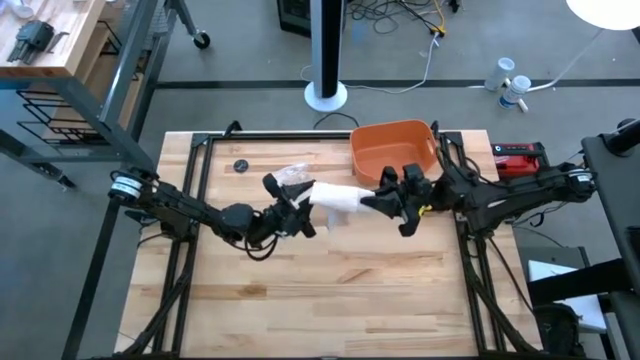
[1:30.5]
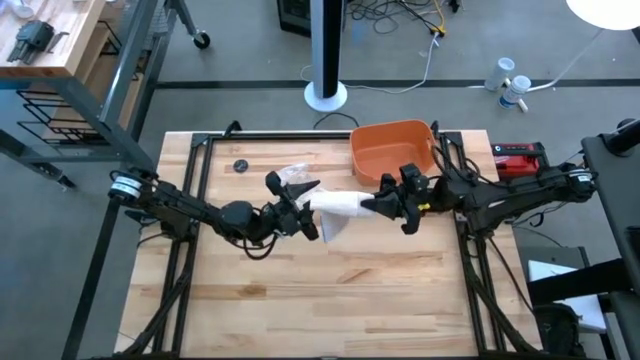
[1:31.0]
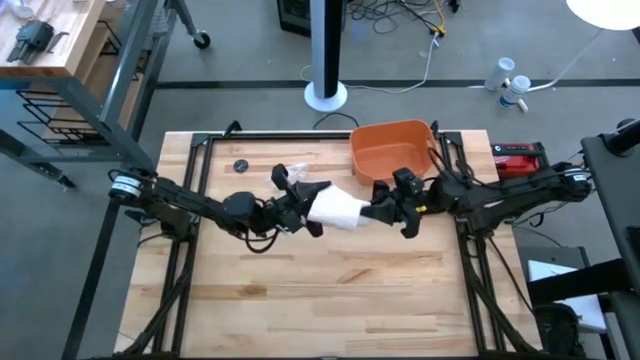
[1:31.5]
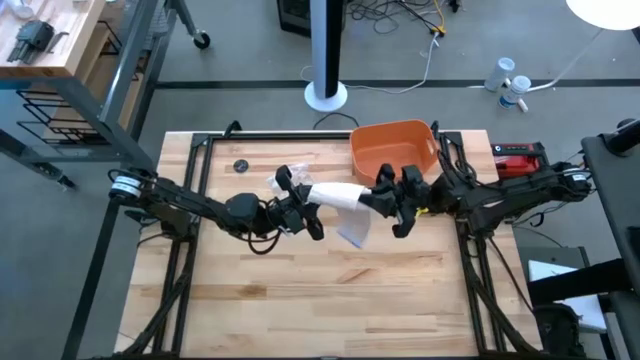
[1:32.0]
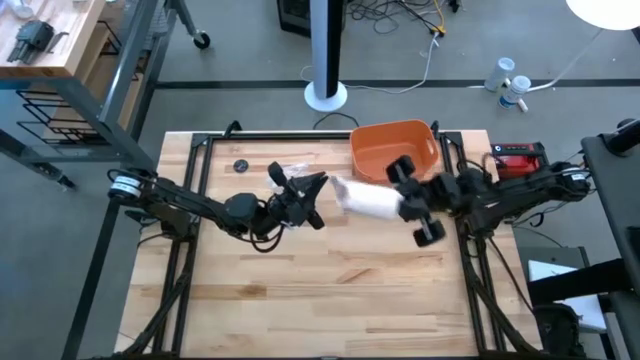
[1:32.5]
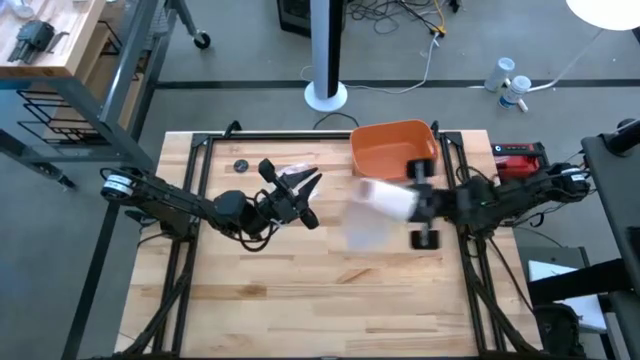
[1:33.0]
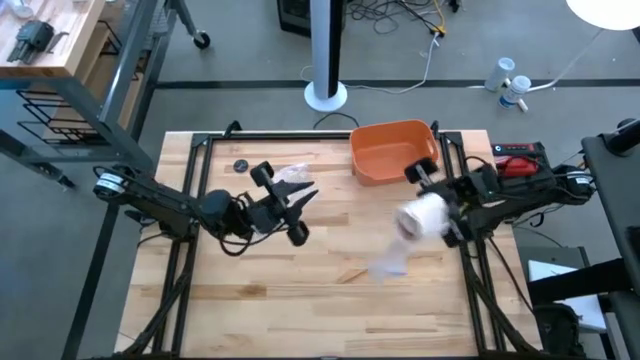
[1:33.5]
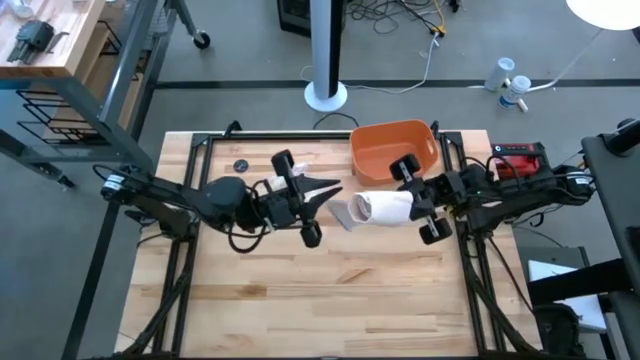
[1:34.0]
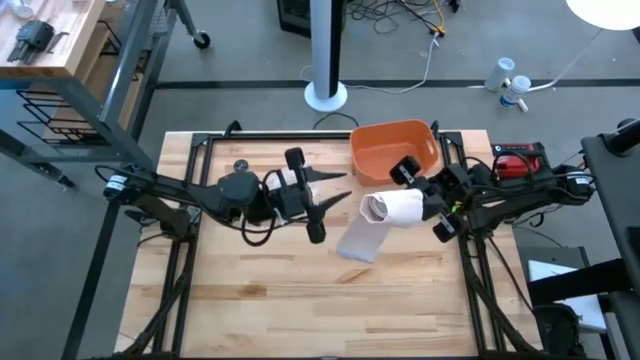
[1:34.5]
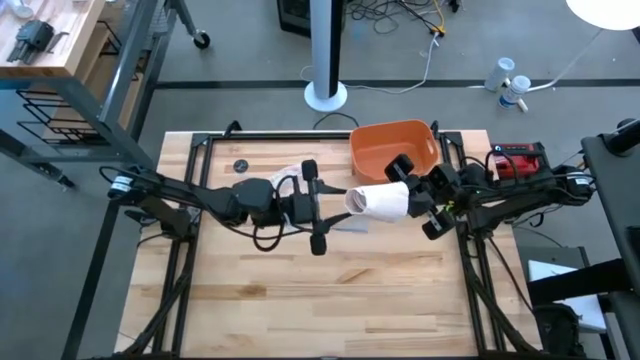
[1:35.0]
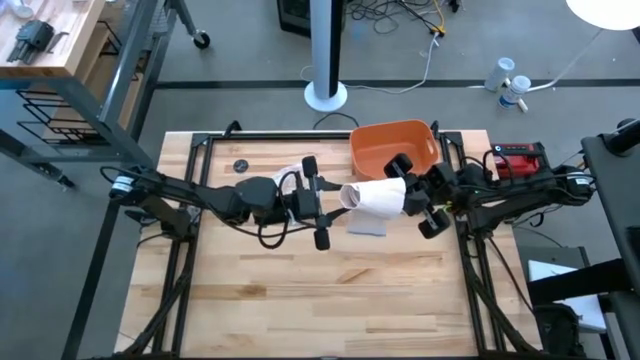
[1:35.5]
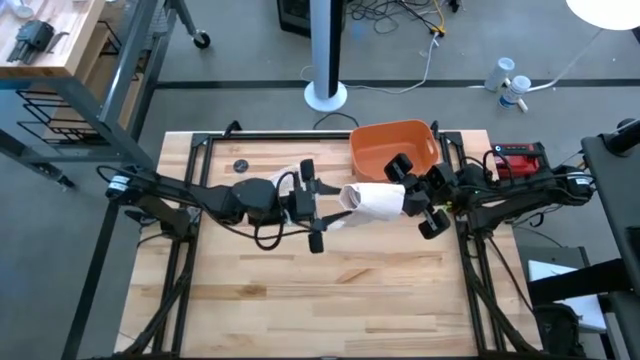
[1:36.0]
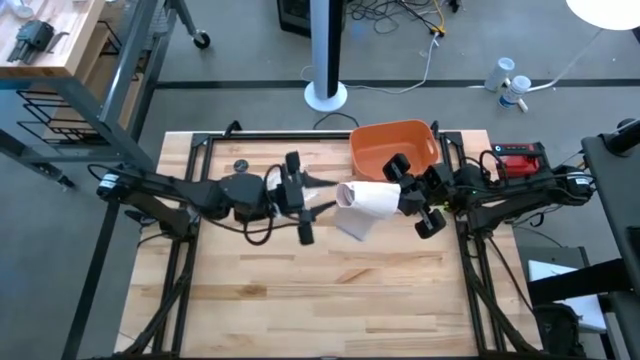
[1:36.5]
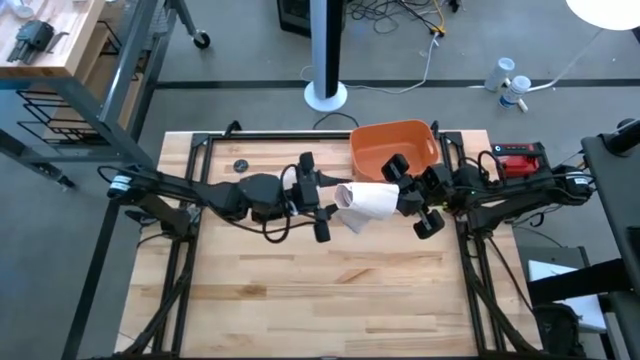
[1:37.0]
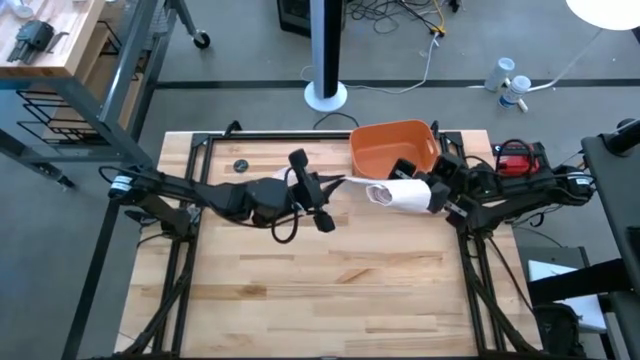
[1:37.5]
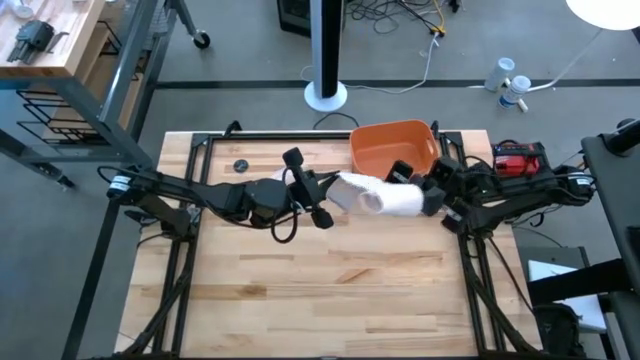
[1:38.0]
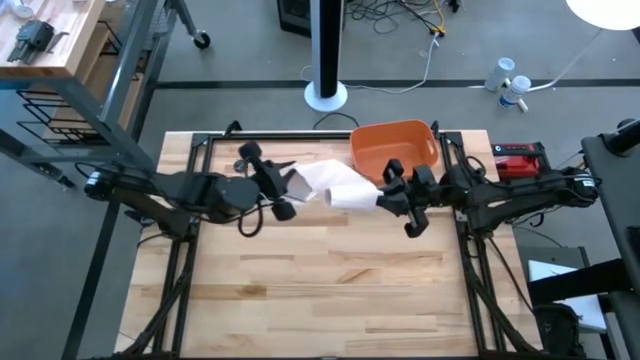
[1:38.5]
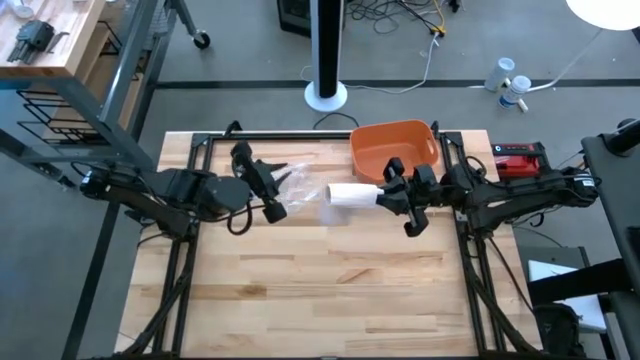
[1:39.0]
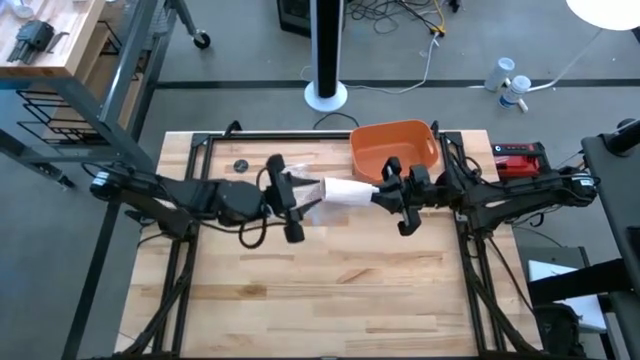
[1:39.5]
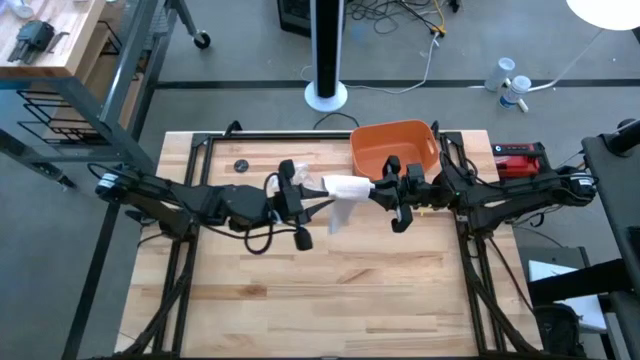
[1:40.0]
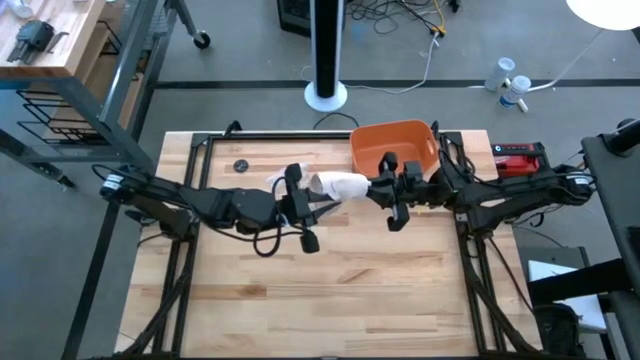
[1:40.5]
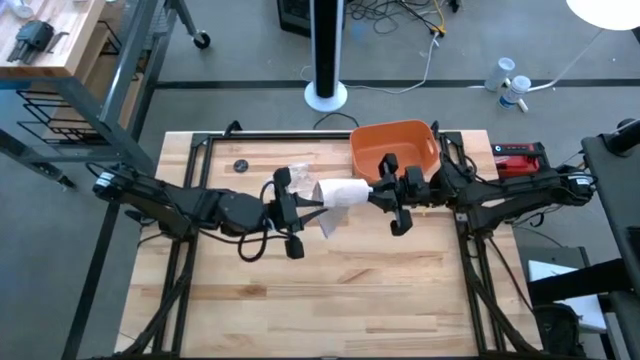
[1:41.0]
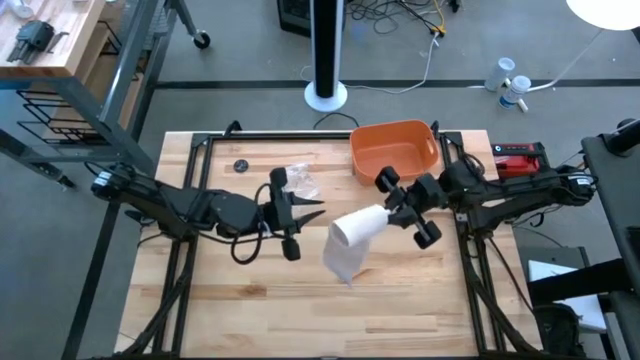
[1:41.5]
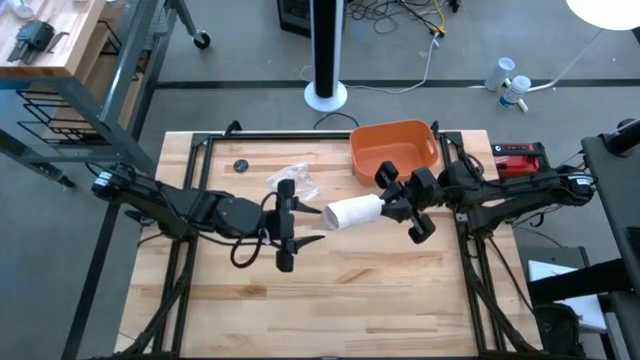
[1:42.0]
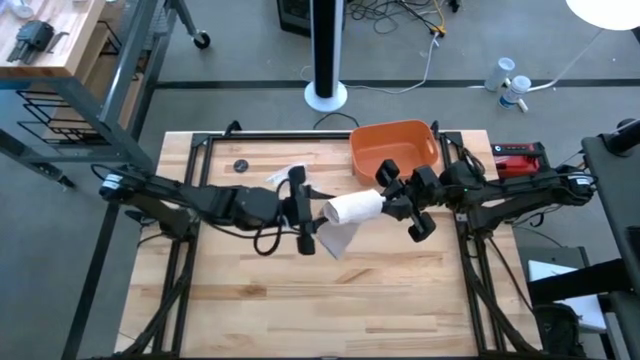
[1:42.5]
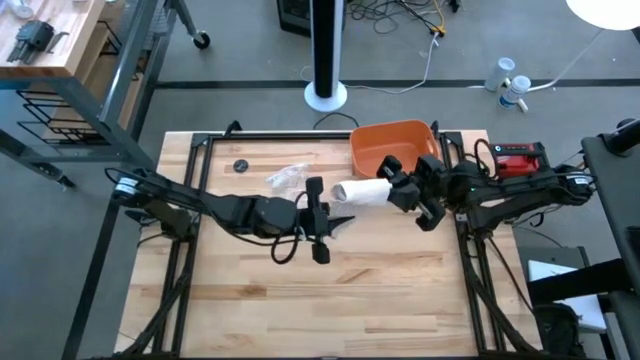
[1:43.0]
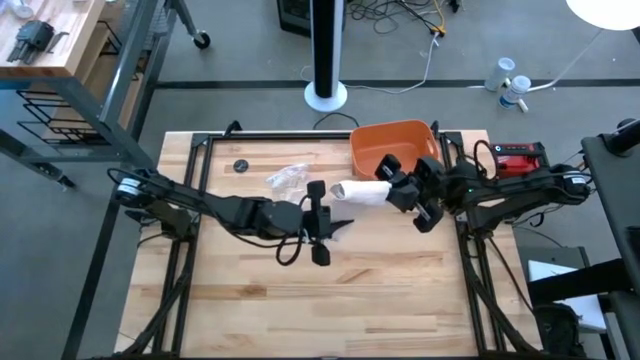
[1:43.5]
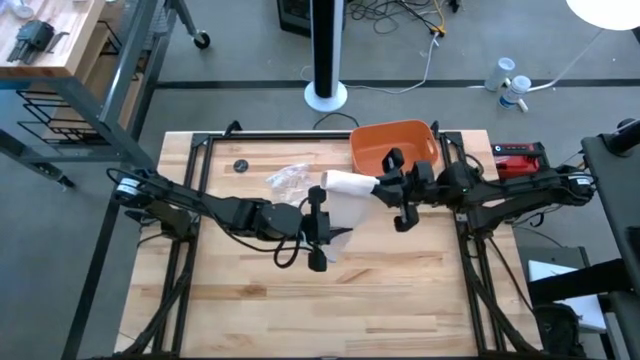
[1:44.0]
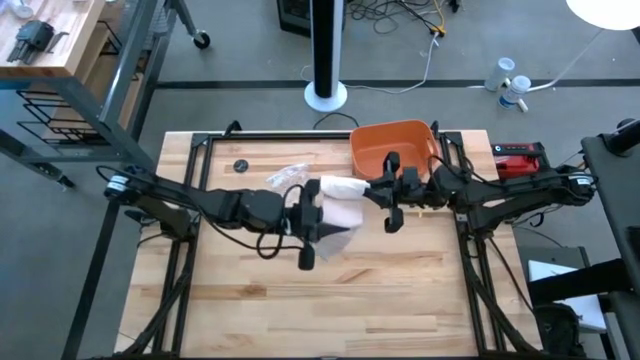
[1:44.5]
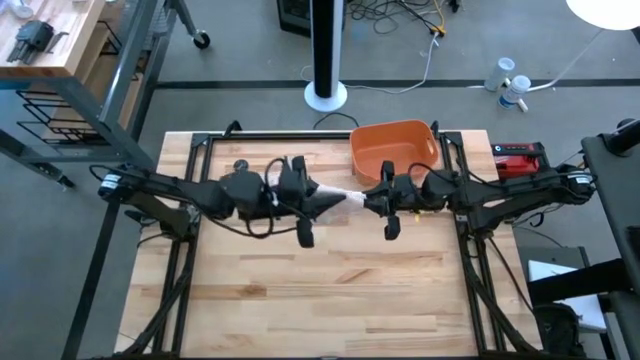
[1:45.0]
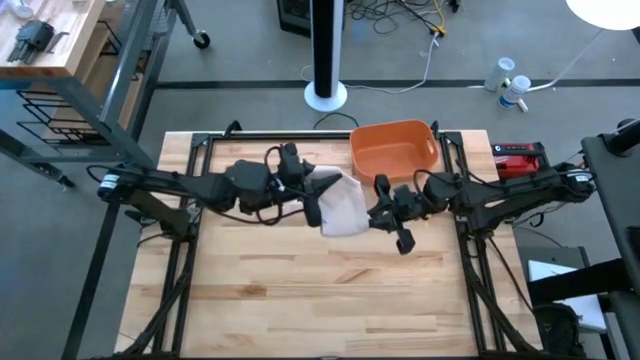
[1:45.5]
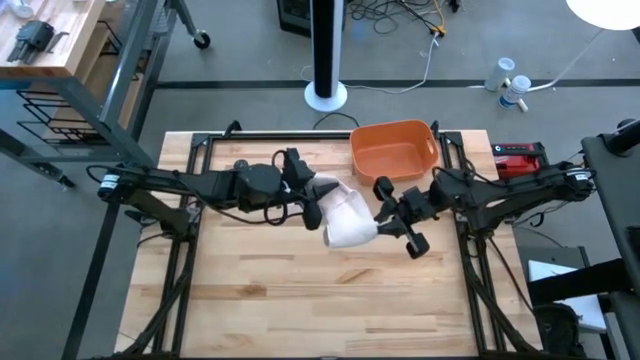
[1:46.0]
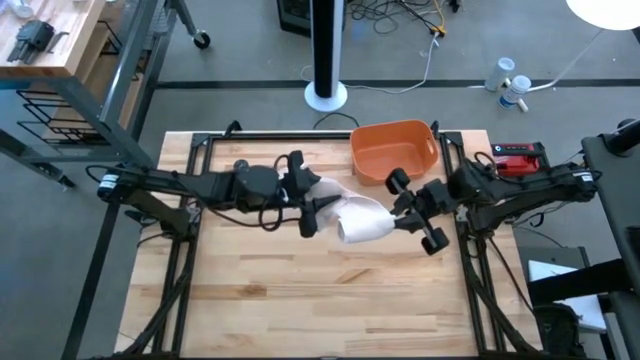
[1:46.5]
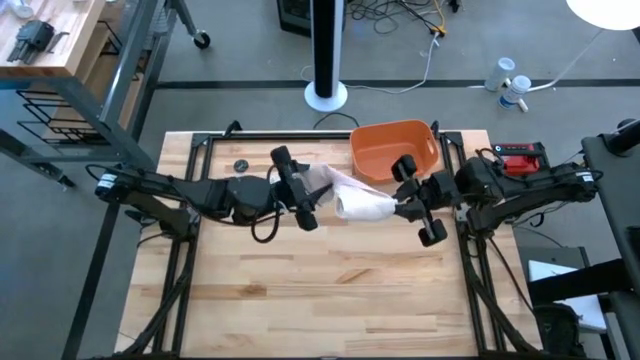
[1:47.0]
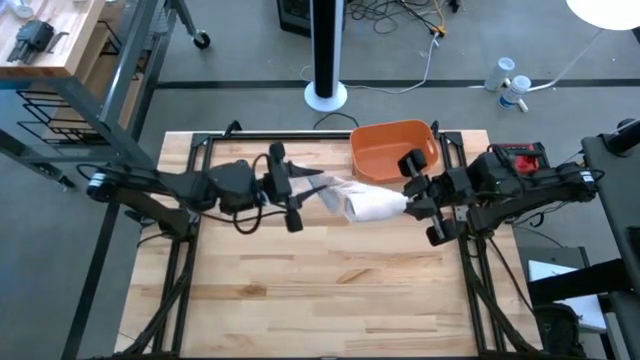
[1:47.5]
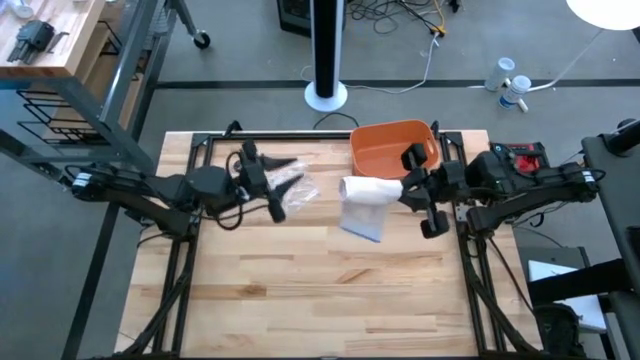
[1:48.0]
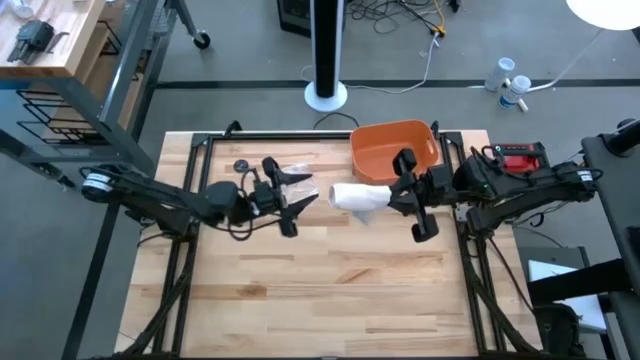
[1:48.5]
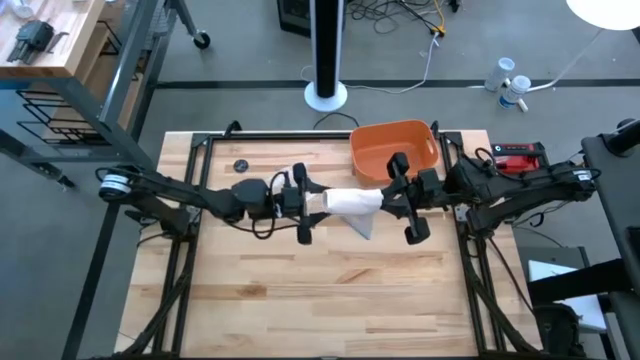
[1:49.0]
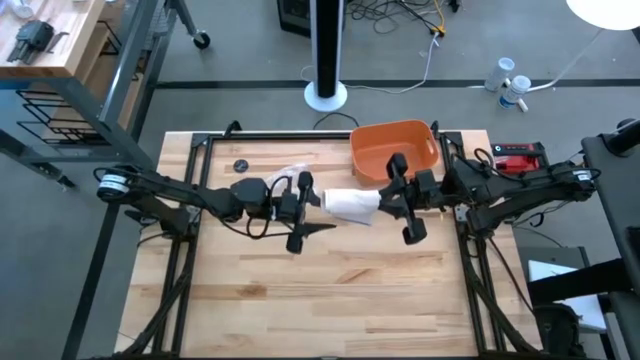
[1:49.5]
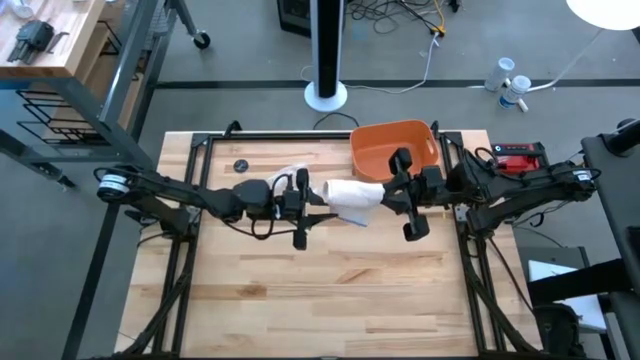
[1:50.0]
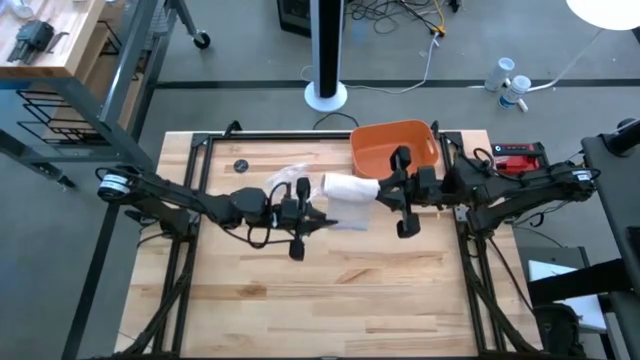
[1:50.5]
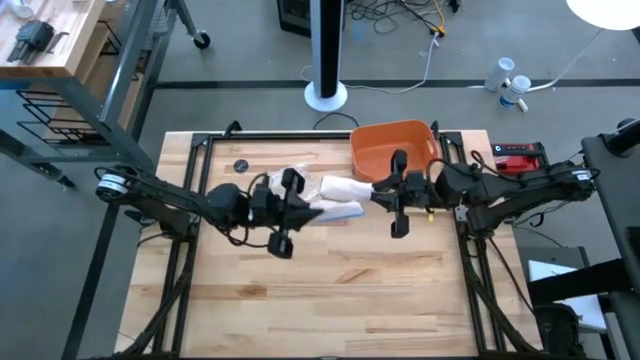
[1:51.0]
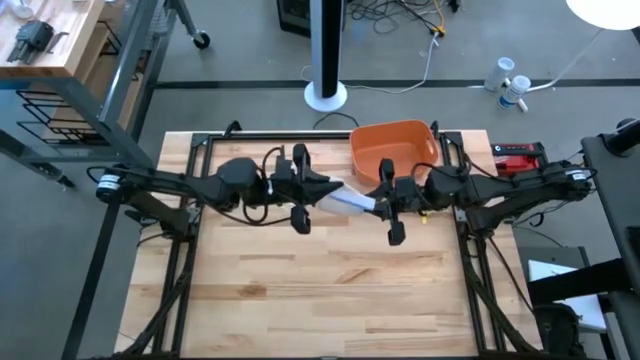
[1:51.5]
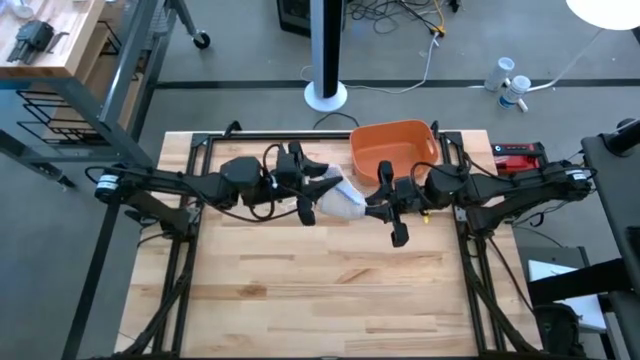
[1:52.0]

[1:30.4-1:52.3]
Task: Roll bandage
Roll the brown bandage

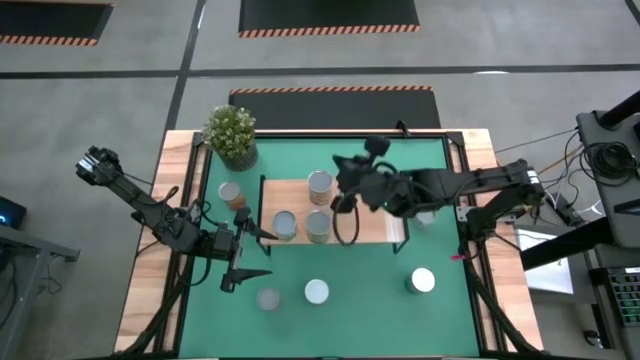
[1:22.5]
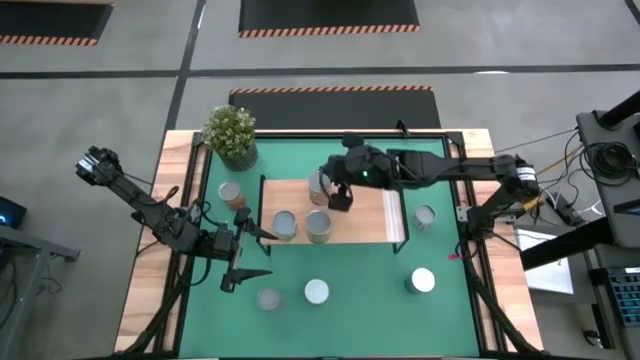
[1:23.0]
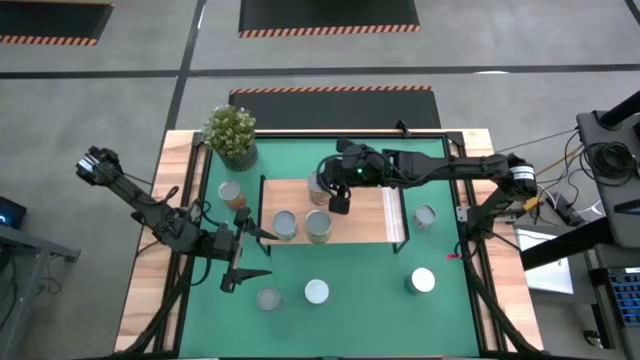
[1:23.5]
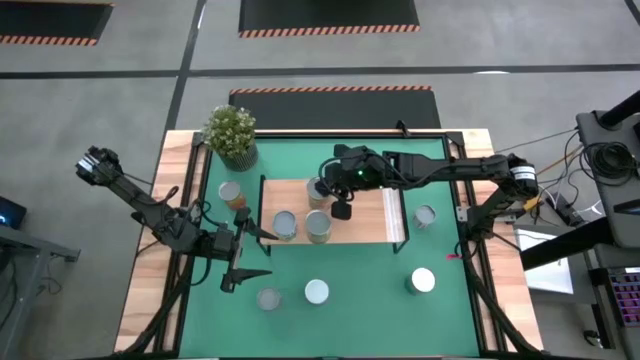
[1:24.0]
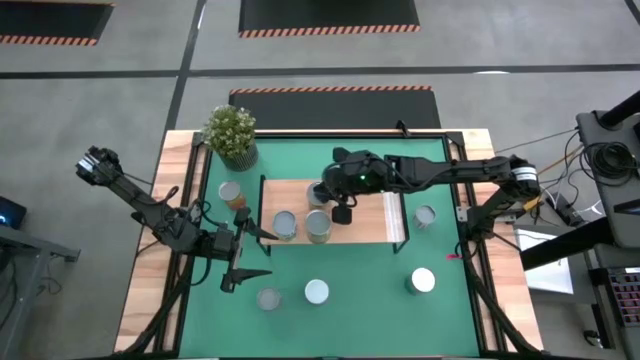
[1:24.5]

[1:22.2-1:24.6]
Task: Pick and place cans onto a shelf
Adjust the canned of peaches on the shelf
